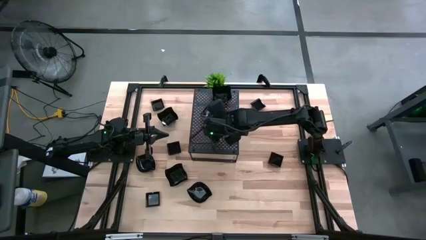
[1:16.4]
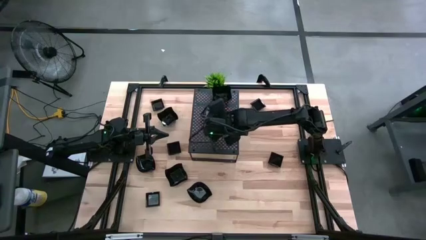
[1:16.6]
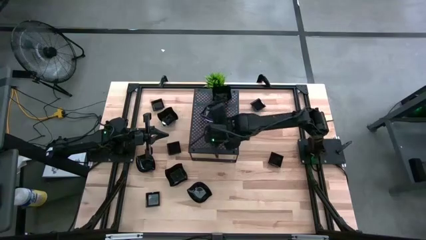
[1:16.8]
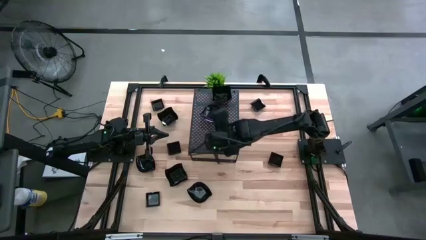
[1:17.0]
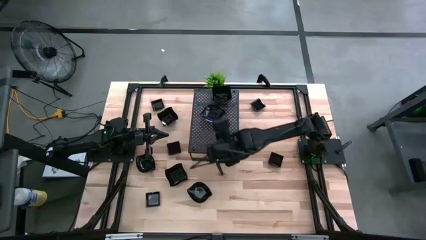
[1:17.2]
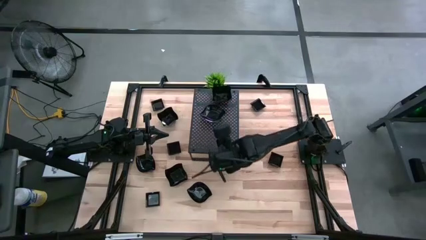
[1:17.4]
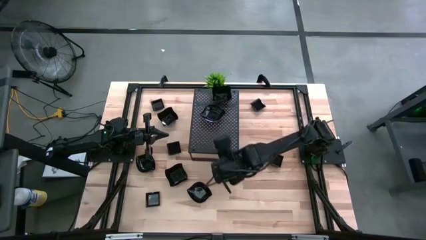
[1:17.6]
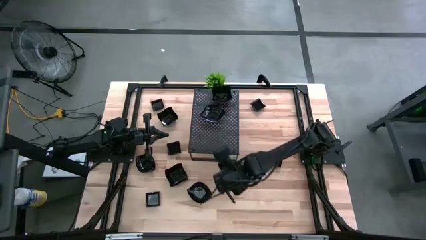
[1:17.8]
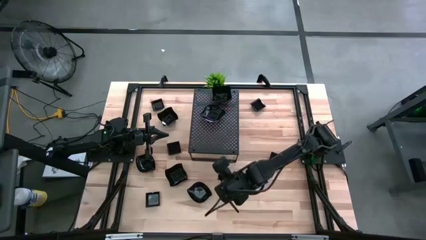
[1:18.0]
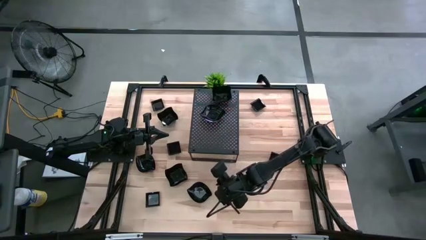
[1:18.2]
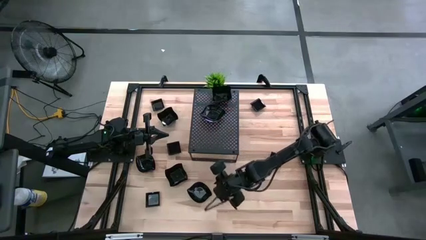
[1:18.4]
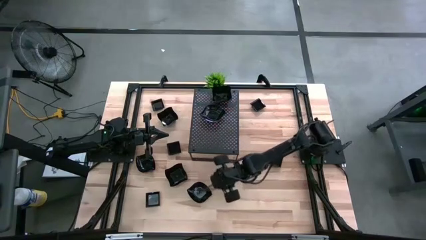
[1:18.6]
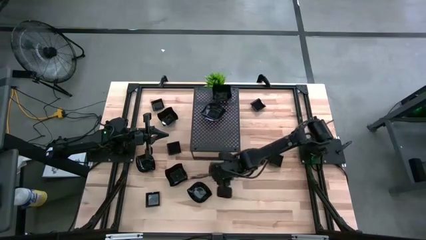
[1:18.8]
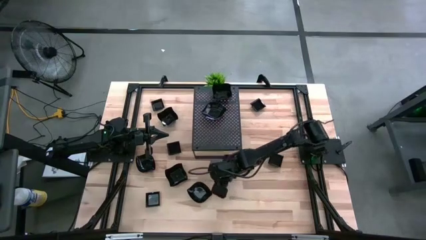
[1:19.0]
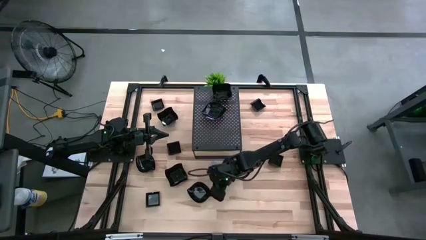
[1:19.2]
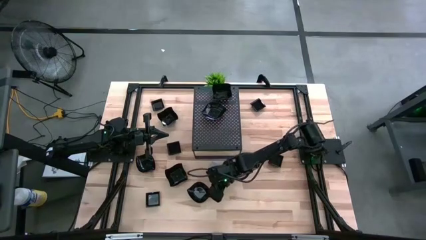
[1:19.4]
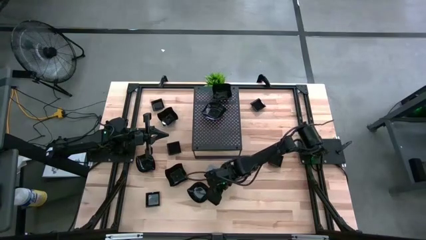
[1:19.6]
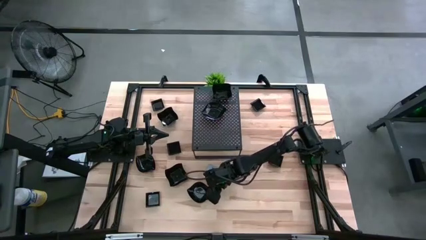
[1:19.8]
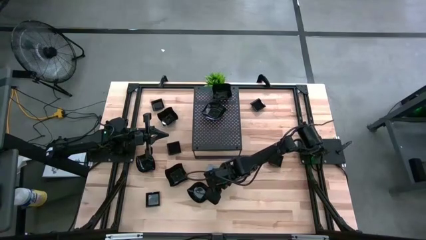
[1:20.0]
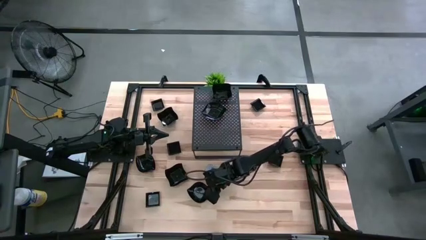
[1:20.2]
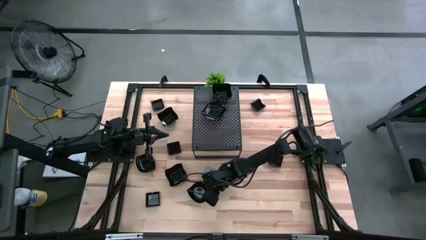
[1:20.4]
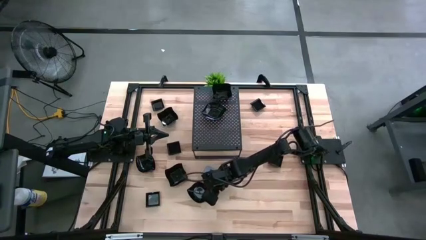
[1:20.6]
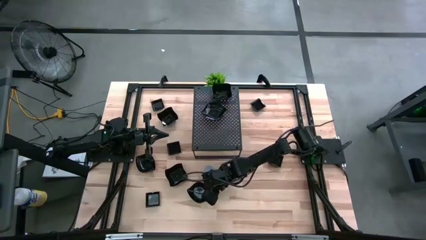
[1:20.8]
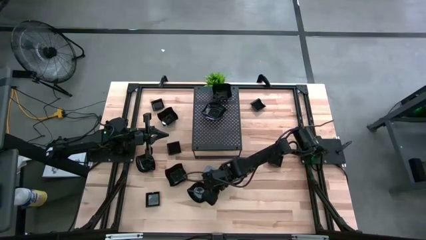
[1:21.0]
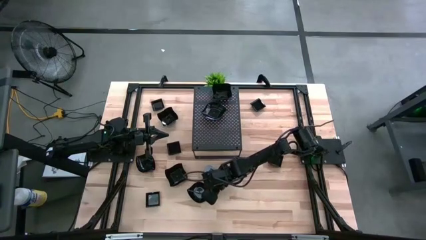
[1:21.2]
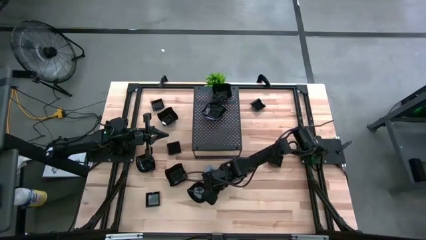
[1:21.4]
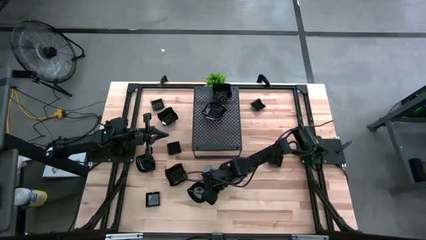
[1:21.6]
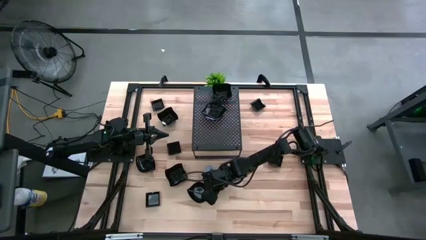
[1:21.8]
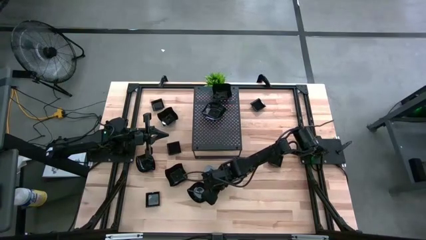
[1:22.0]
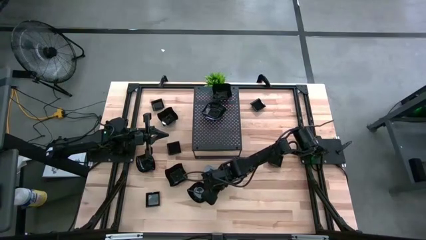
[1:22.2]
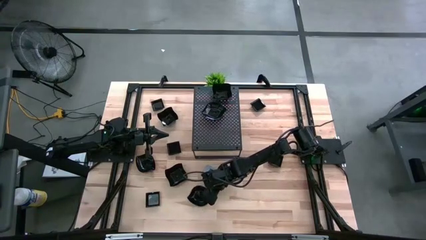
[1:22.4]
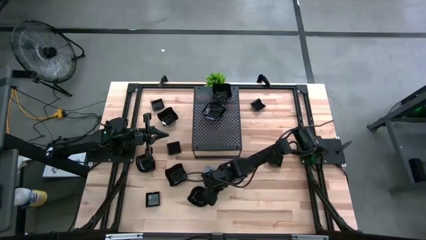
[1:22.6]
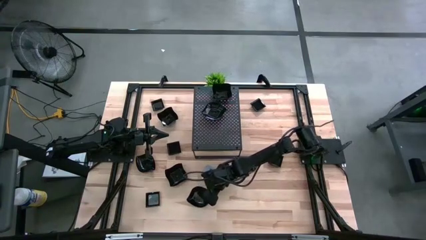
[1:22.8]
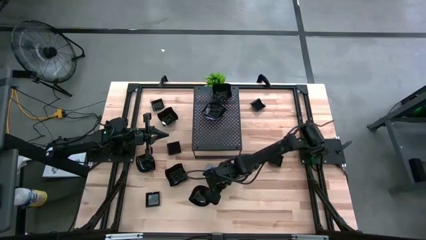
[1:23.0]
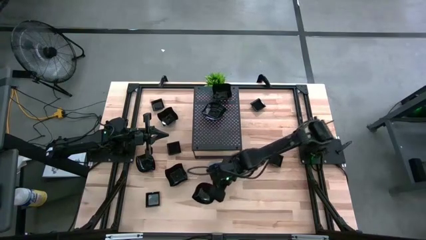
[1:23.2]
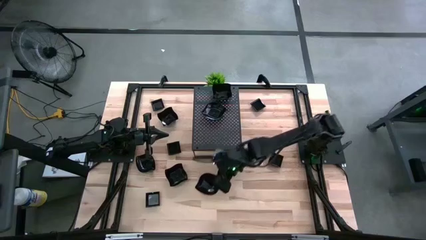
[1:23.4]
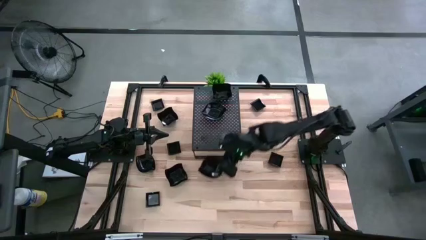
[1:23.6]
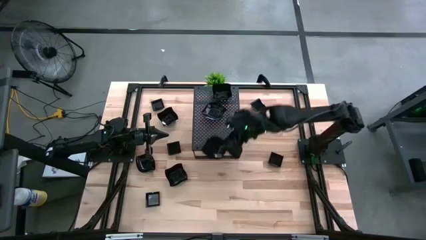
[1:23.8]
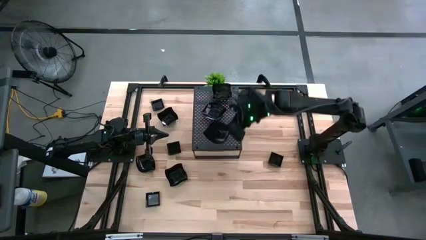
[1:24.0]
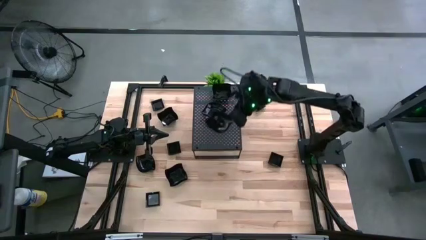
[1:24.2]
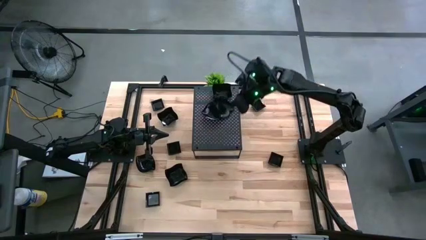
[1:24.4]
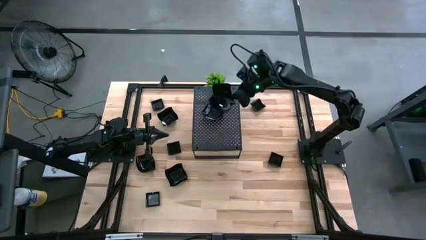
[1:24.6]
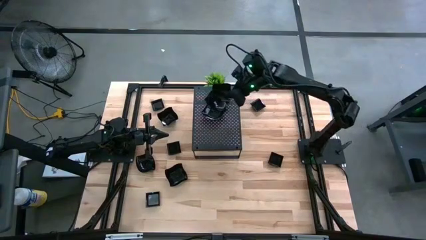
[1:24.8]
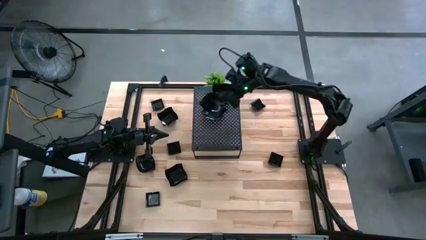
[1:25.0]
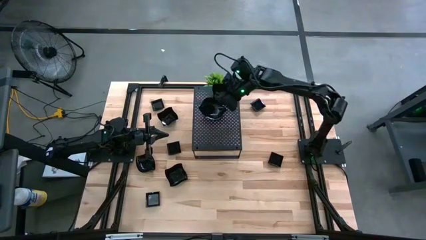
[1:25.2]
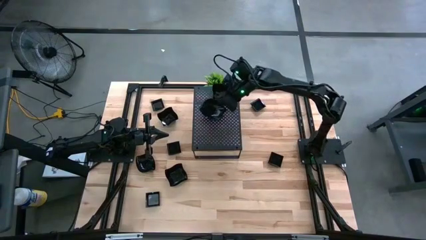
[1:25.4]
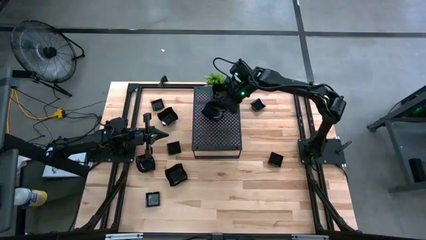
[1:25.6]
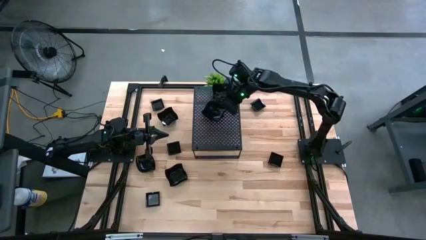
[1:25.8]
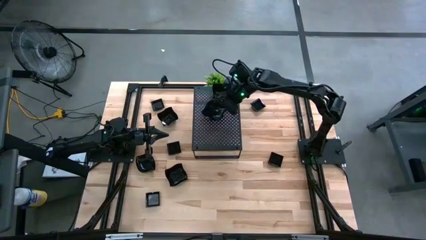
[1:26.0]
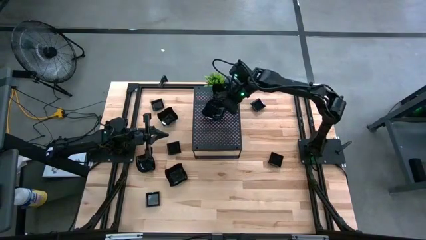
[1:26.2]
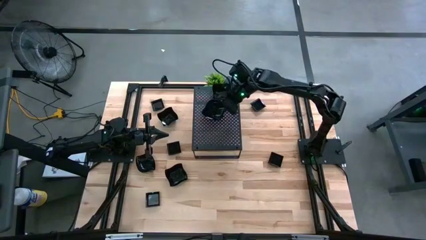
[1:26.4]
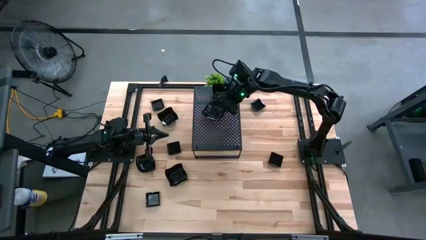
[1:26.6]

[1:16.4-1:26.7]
Task: Pick & Place Mini shaped plates
Stack the leaf shaped plate on top of the leaf shaped plate on the shelf

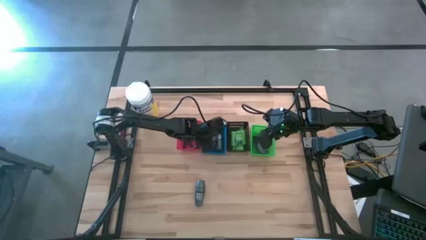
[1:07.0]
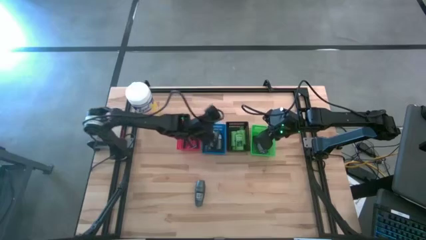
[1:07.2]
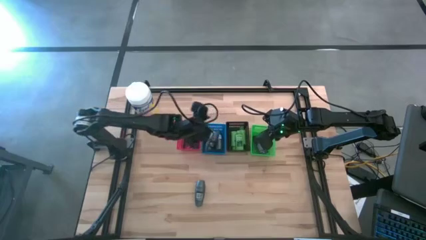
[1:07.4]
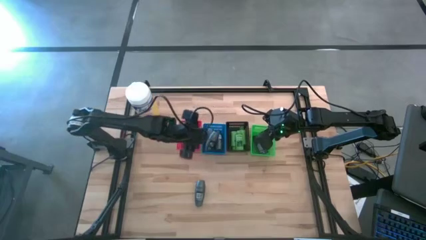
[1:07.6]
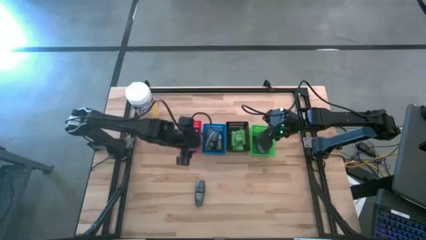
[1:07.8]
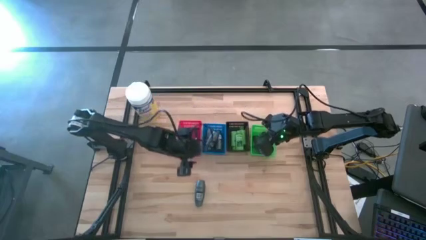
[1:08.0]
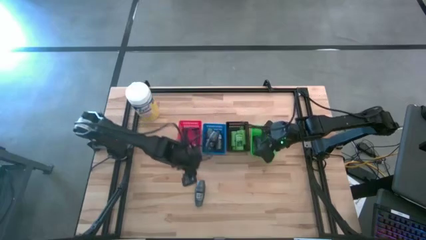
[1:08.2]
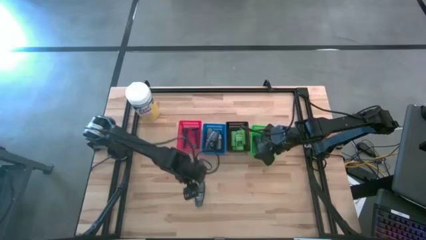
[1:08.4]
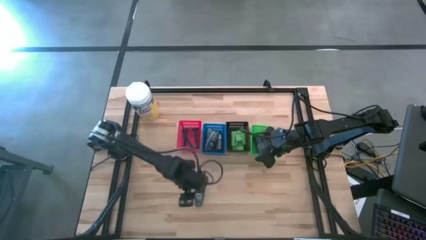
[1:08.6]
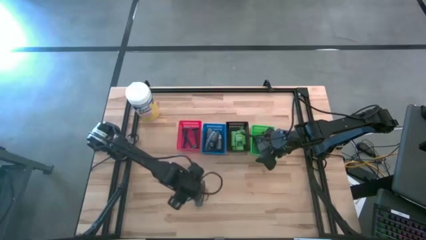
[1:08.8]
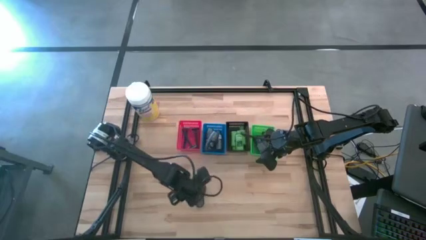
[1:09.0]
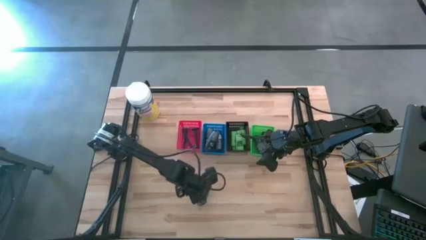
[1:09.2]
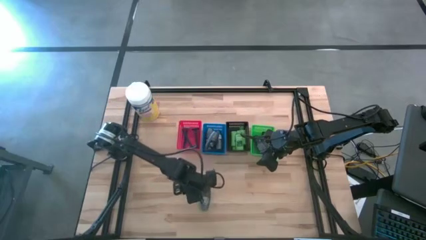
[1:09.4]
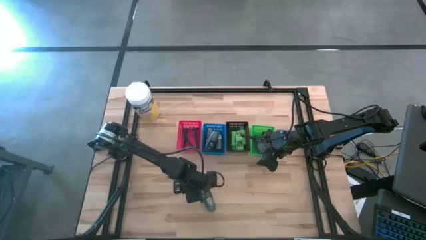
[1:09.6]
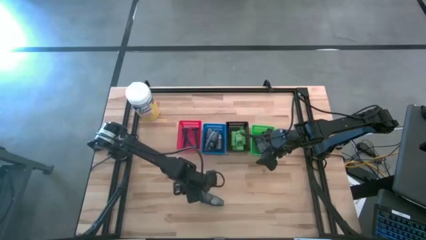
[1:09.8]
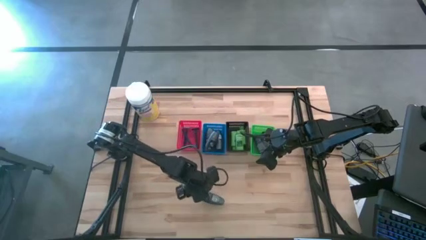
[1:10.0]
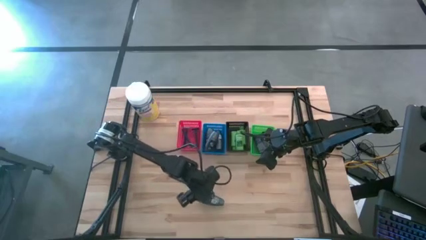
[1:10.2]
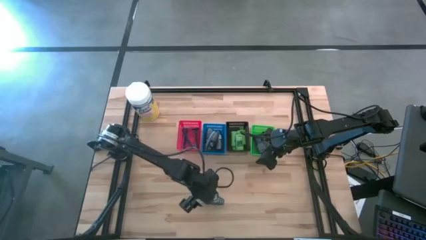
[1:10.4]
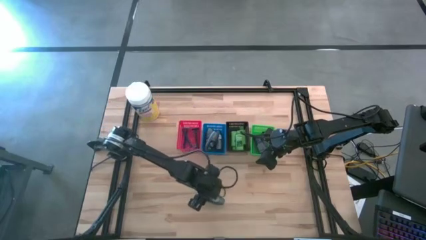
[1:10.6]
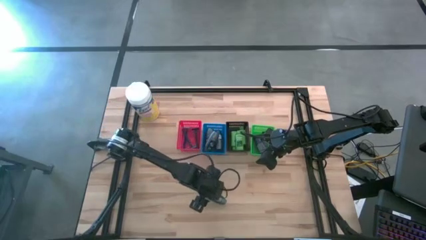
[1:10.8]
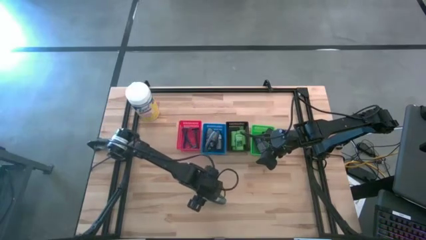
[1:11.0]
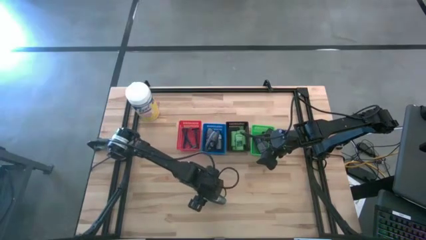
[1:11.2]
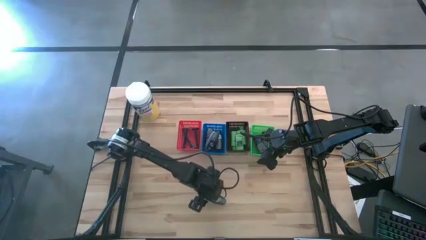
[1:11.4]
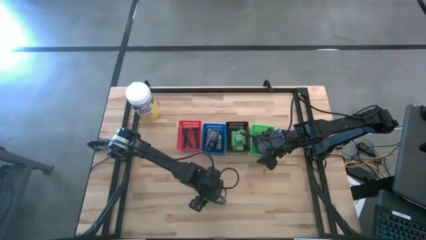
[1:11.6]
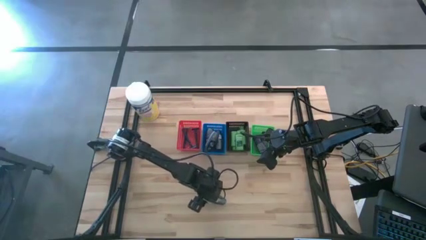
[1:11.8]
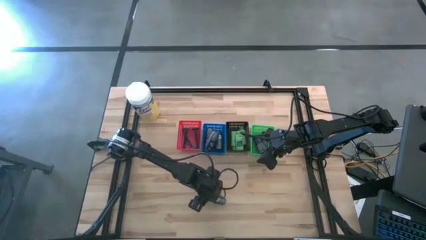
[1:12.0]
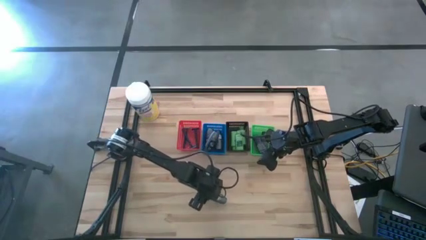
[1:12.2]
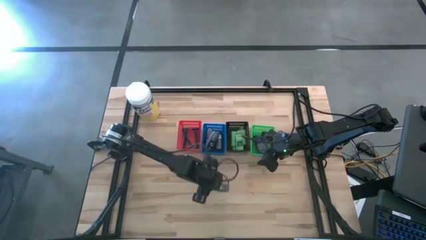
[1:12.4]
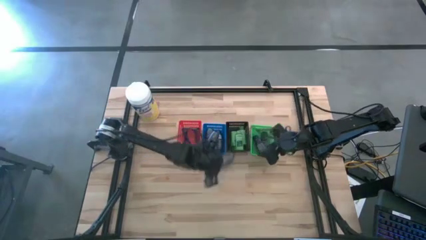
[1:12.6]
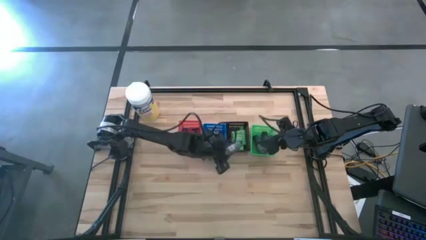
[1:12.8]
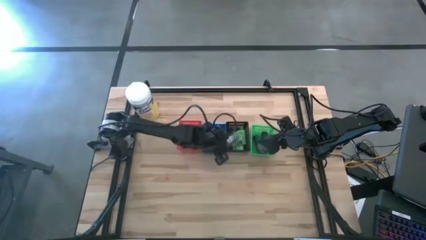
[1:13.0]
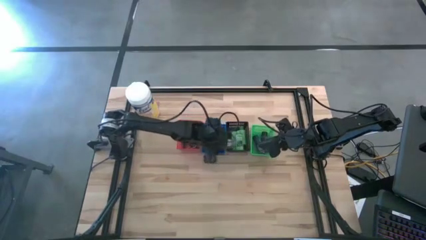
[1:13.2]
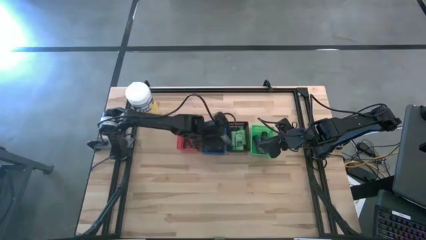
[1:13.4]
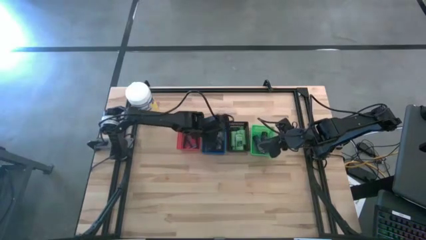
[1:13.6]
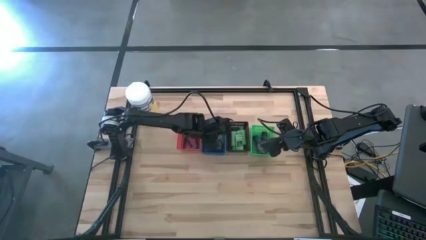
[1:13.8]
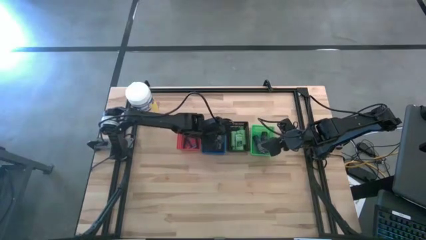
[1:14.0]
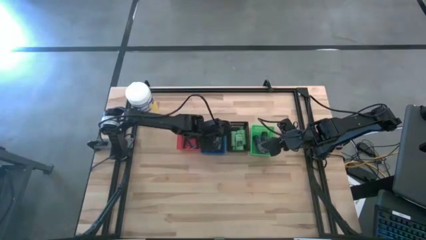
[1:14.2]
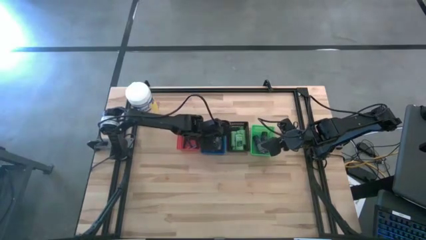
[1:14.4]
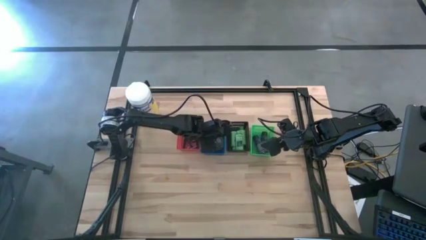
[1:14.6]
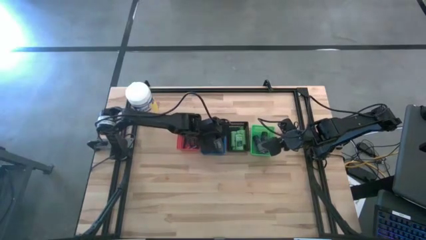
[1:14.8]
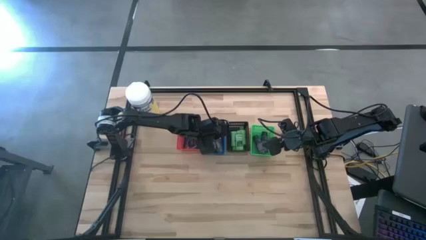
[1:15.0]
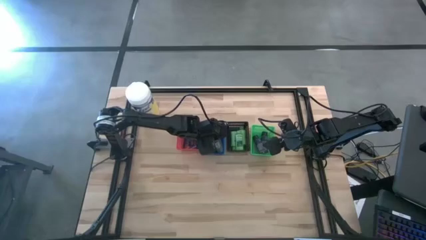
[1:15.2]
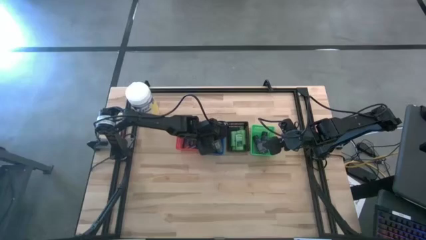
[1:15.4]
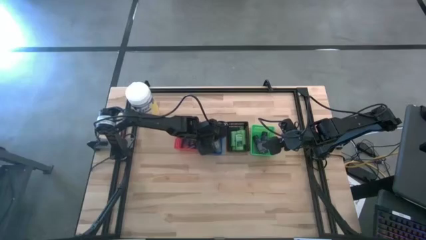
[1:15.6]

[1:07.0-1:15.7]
Task: Pick & Place Travel size toiletries
Put the deodorant into the blue basket
